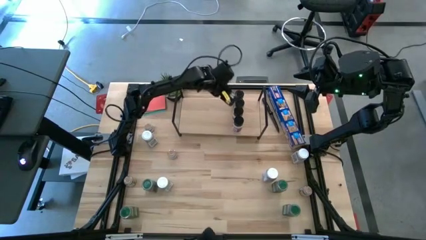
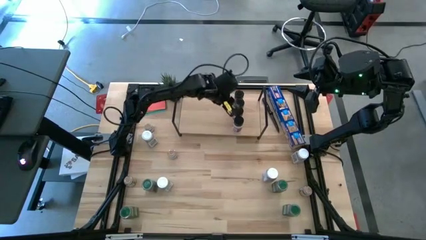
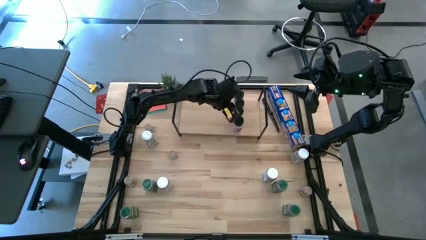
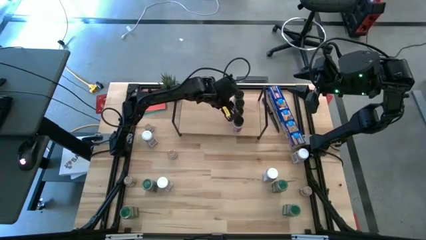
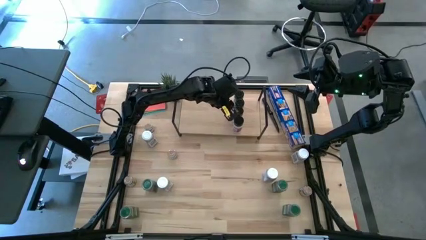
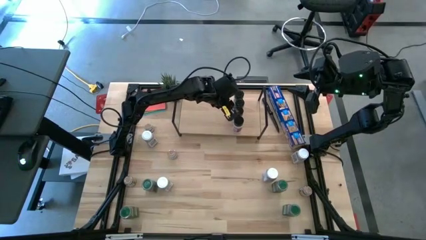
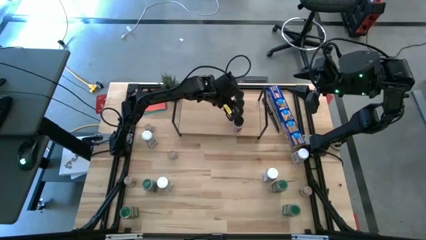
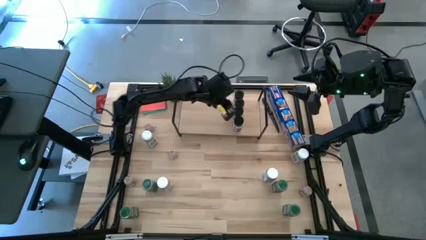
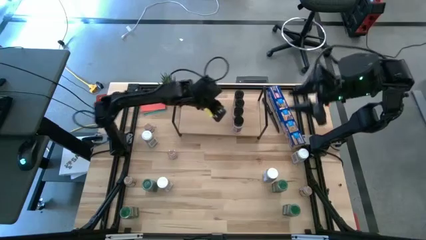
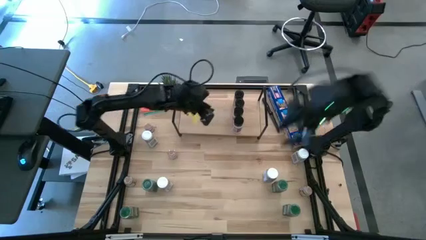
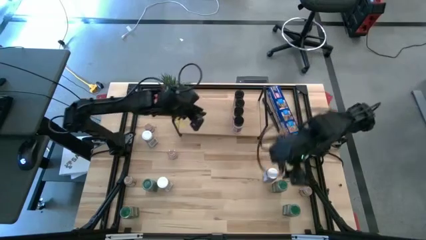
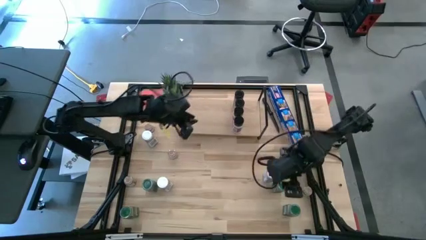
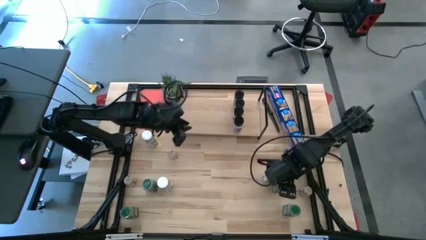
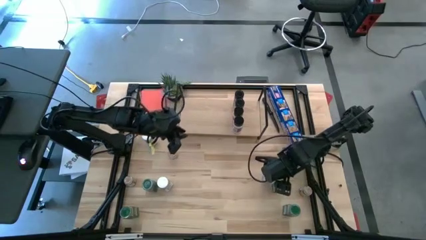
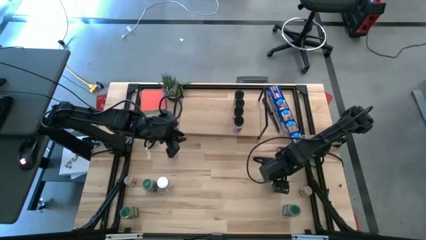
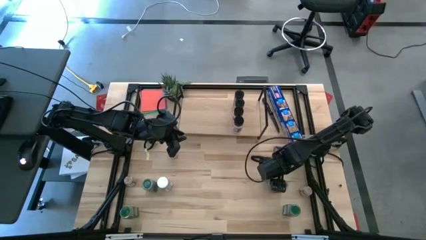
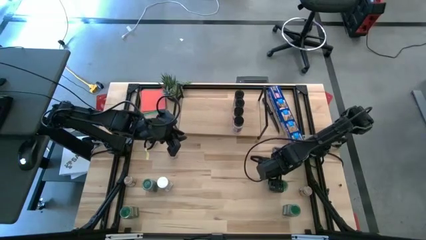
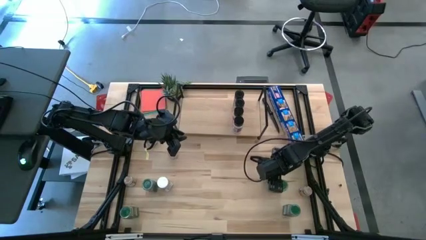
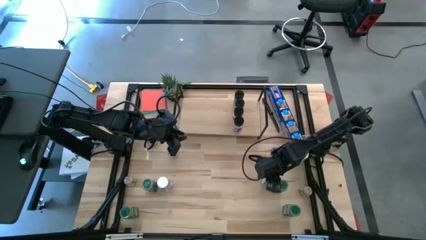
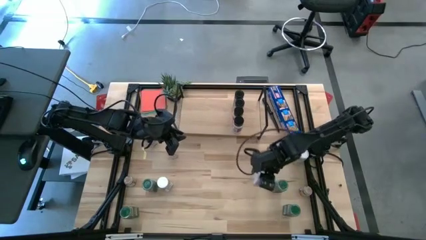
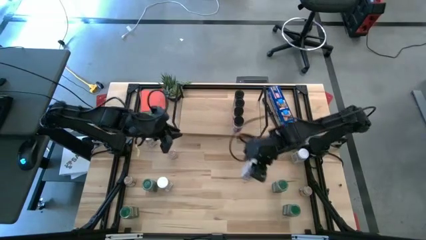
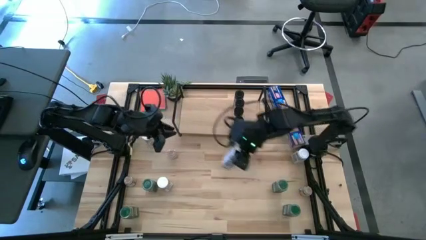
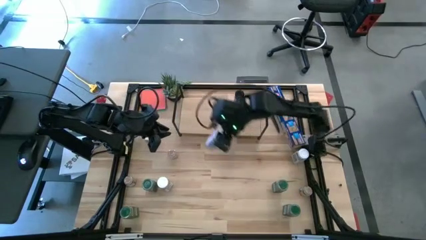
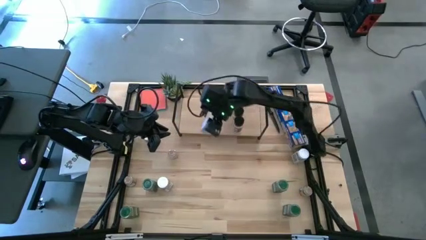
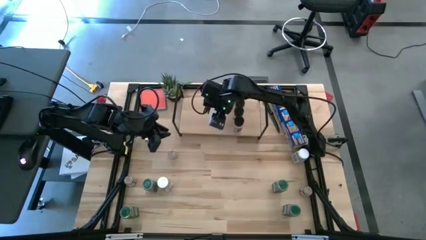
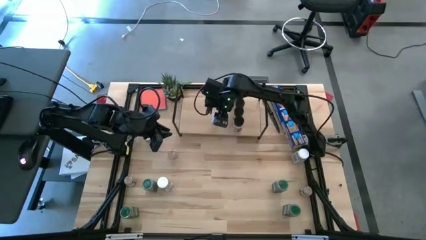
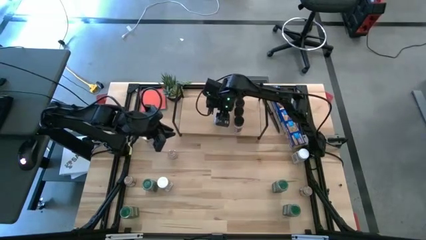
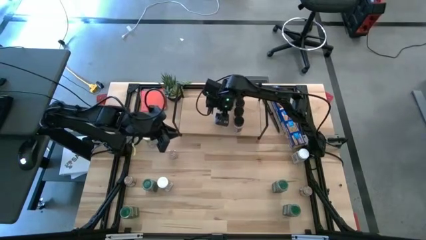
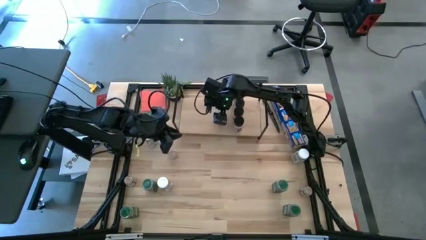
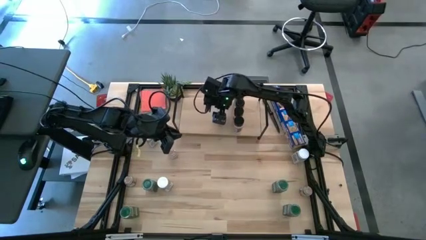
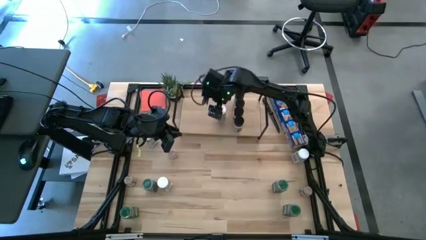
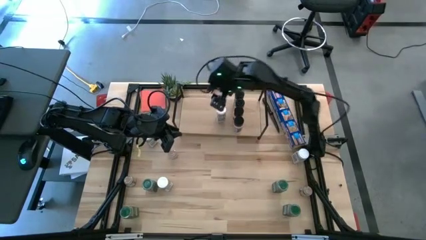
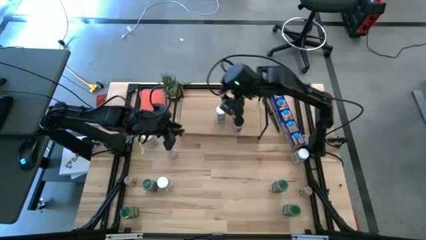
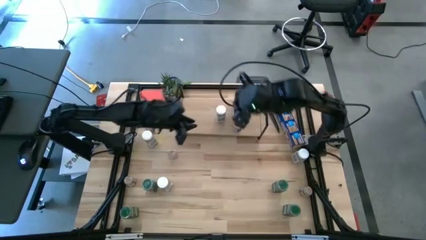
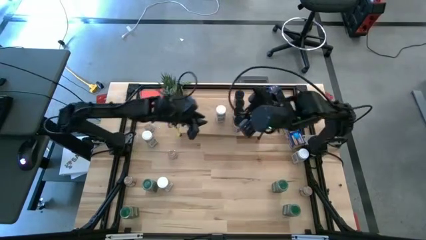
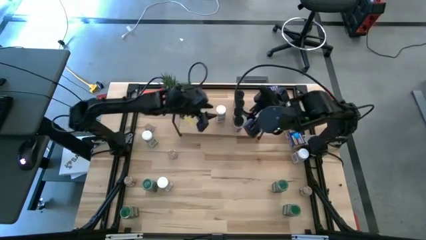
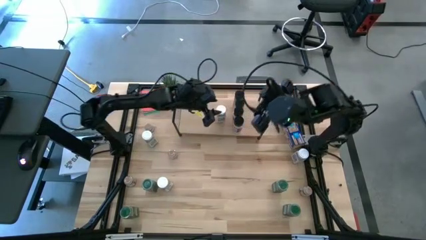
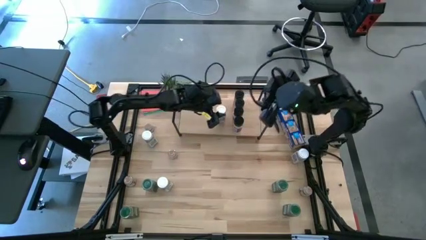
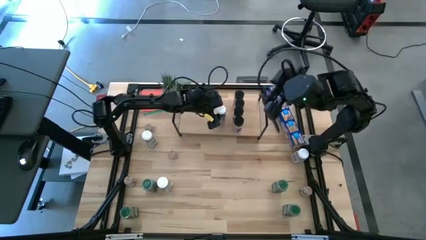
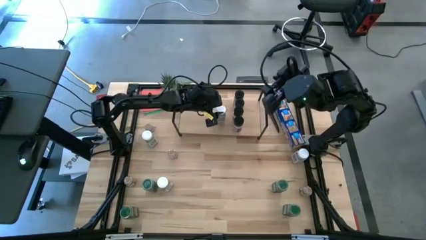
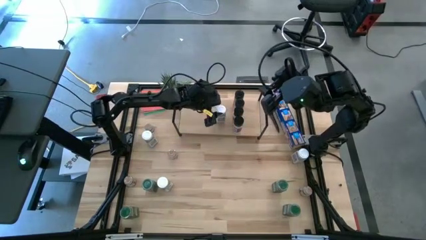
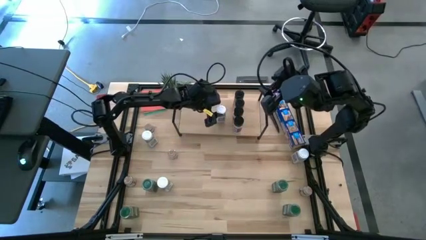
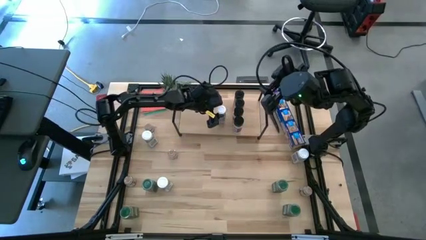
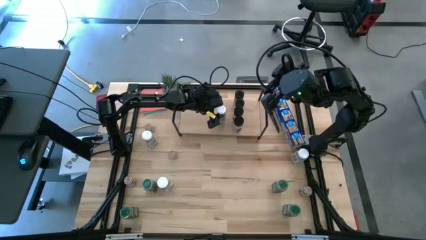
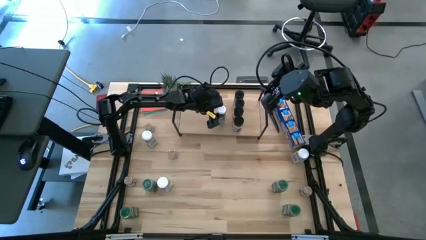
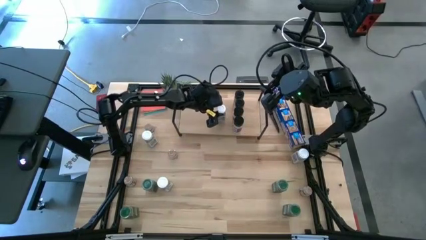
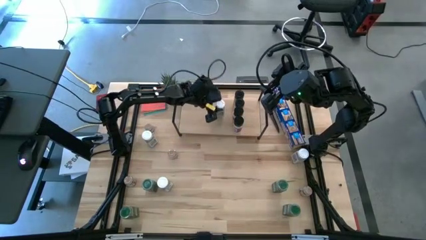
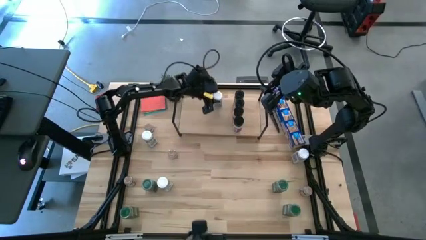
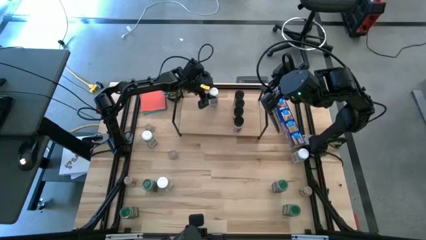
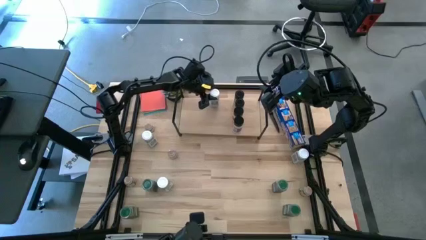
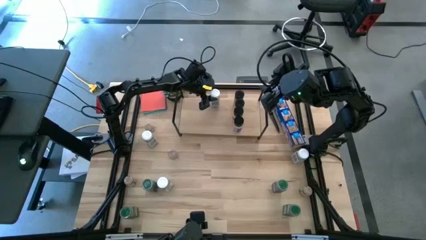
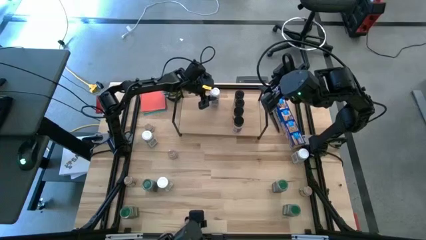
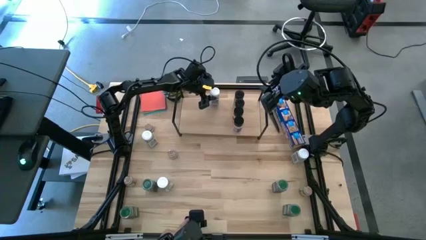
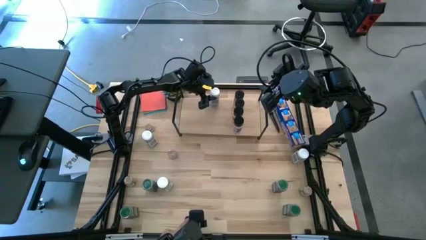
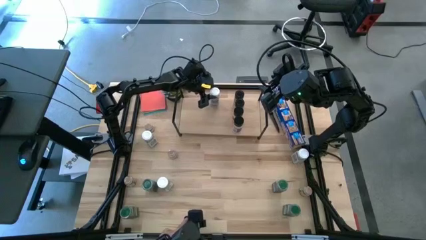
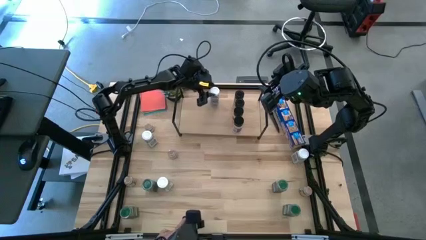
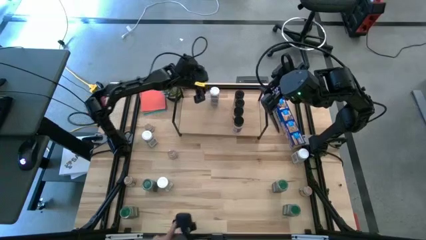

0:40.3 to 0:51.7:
Task: Shelf spices
Put the white seasoning bottle on the shelf

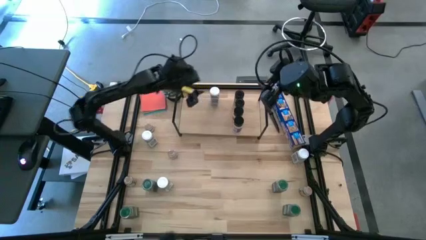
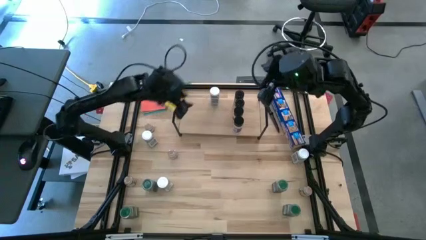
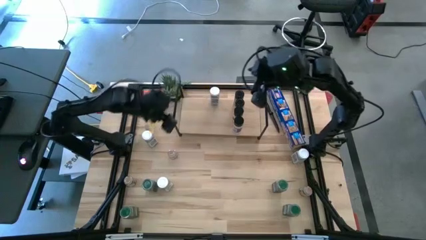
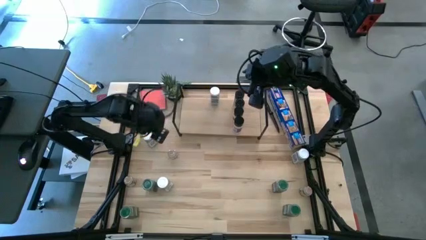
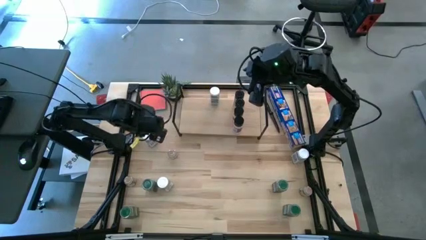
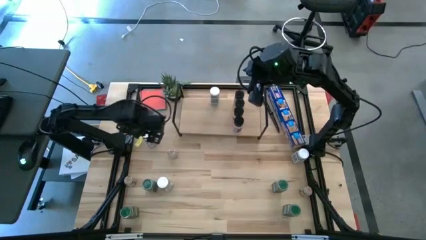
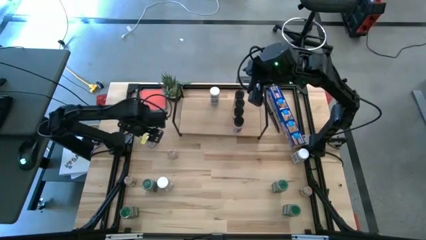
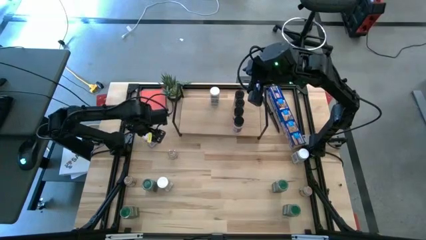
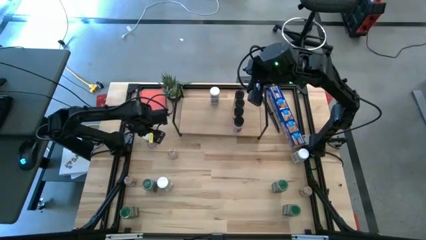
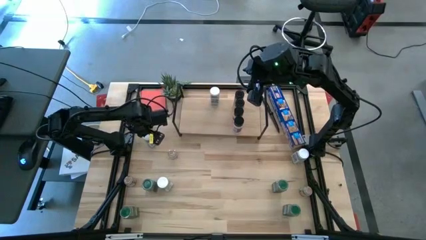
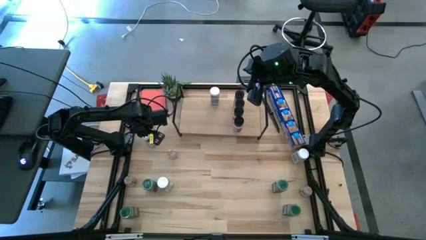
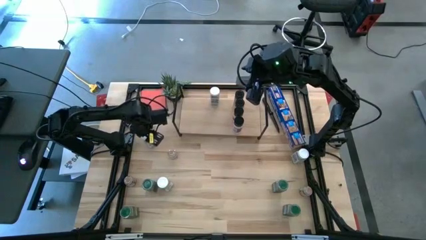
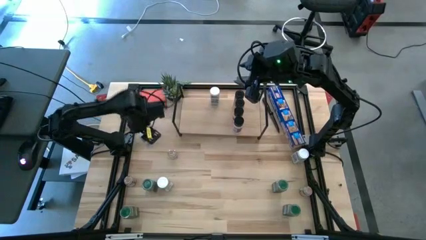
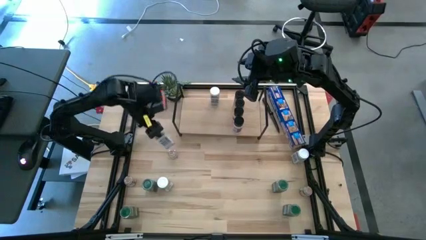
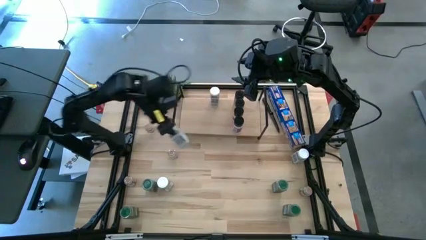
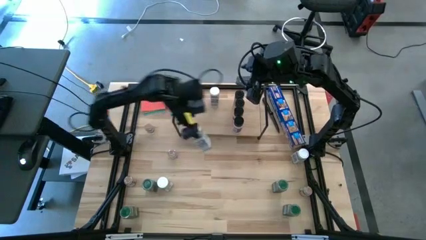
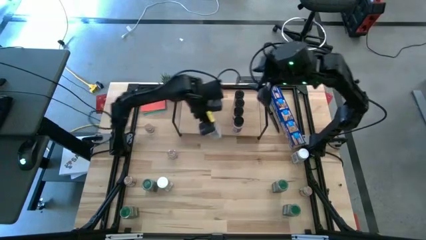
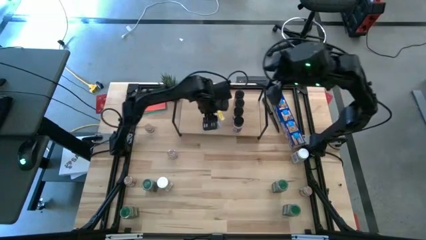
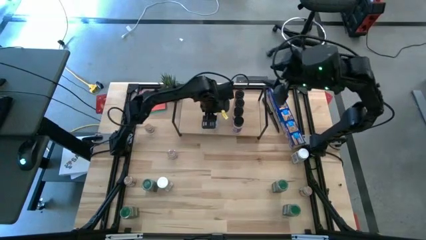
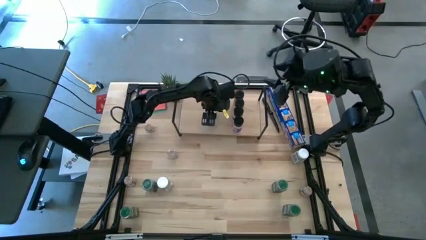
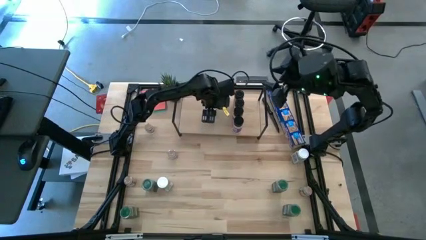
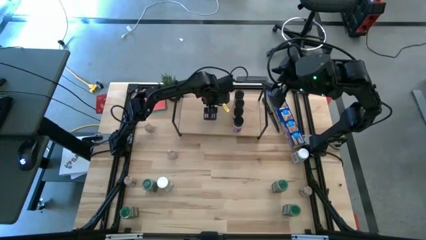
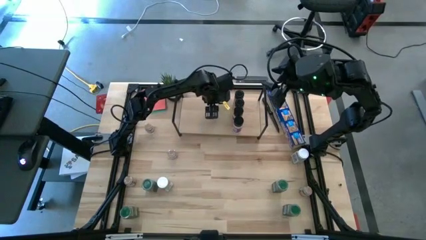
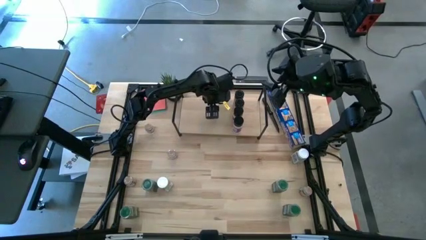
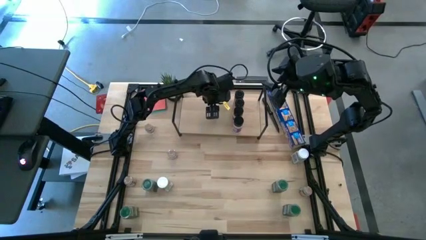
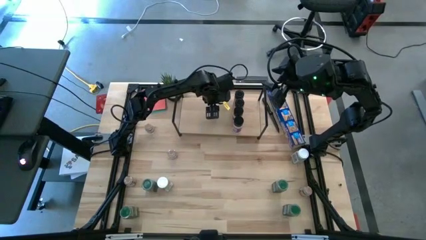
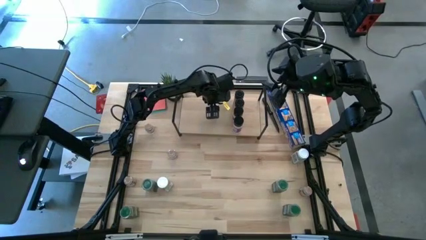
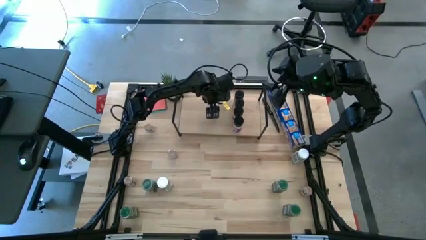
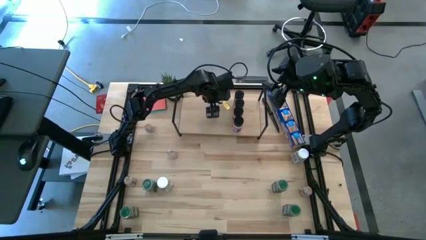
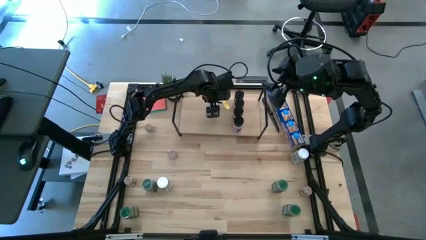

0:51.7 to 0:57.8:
Put the white seasoning bottle on the shelf aligned with the other white seasoning bottles
